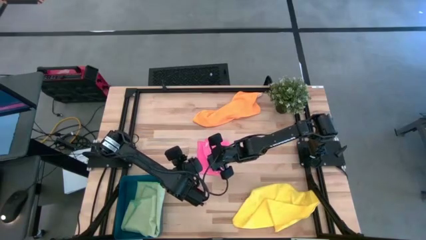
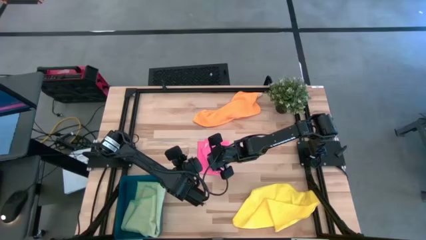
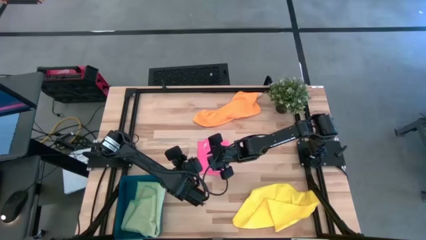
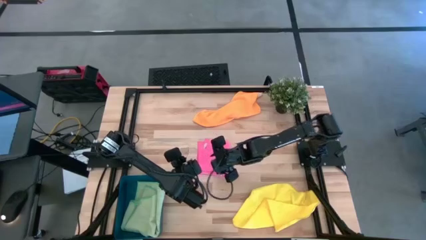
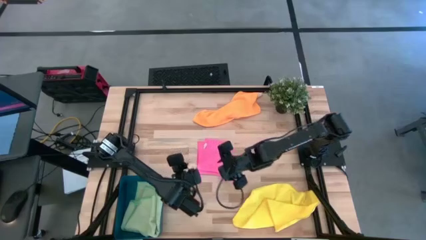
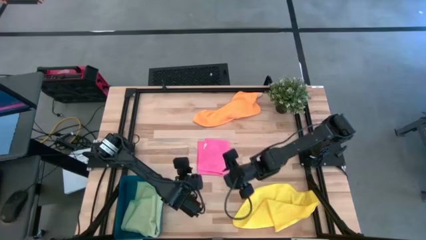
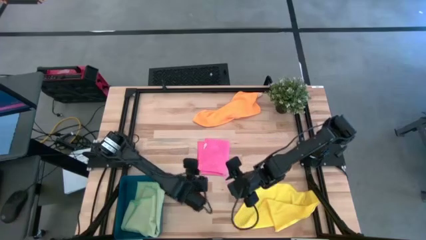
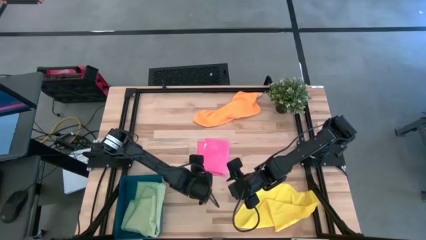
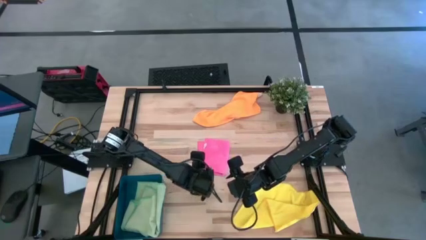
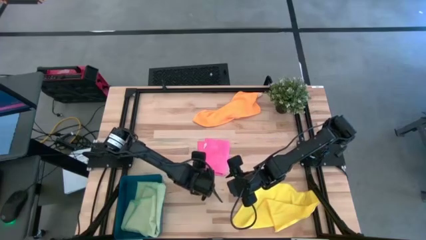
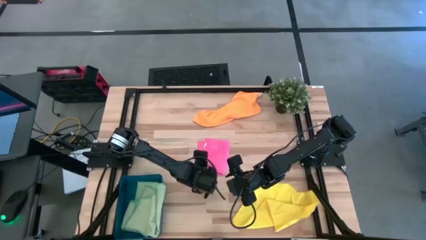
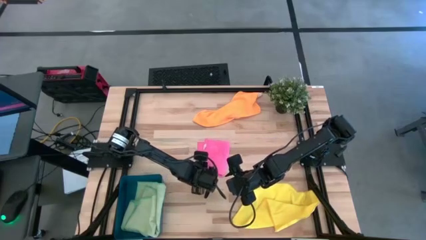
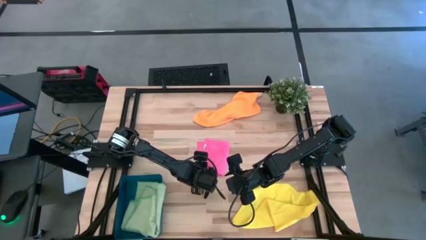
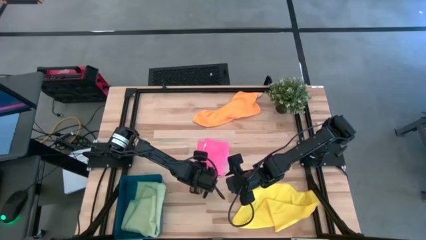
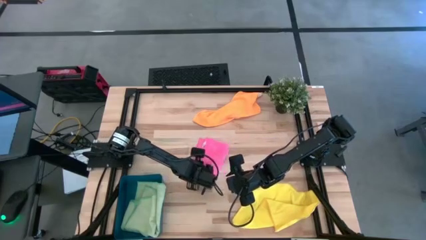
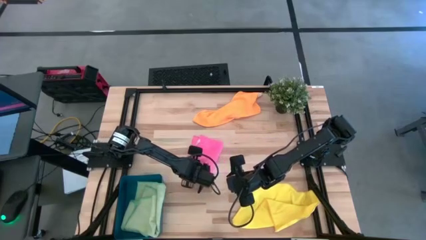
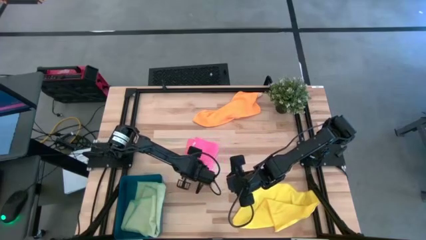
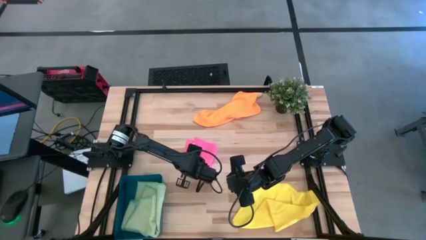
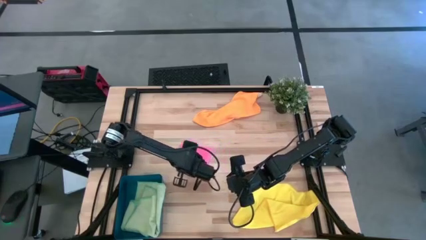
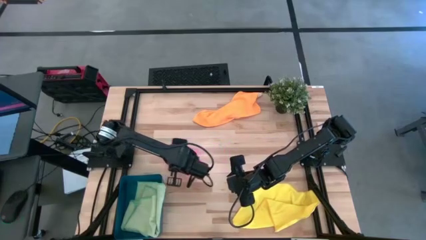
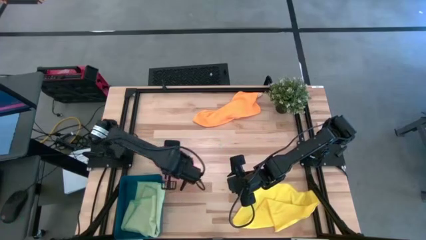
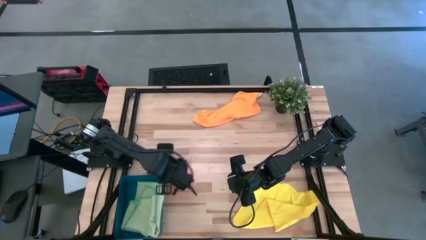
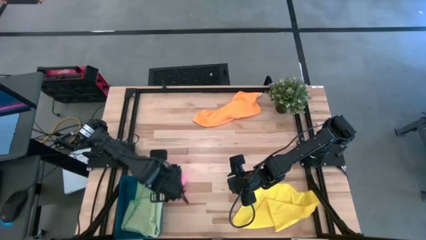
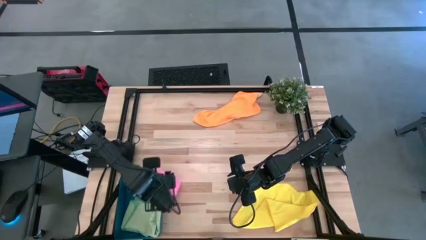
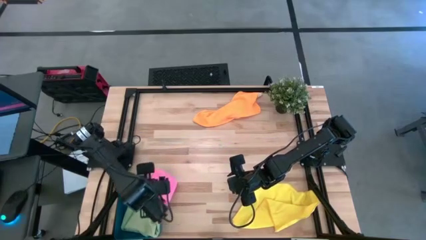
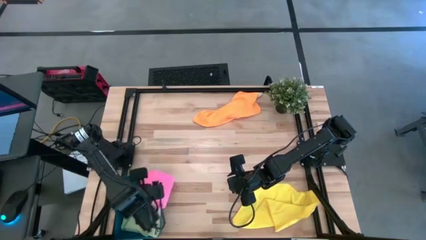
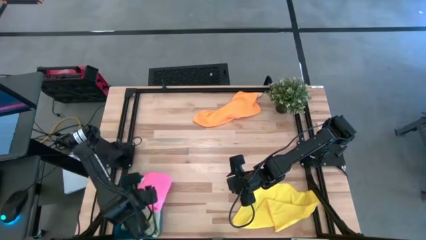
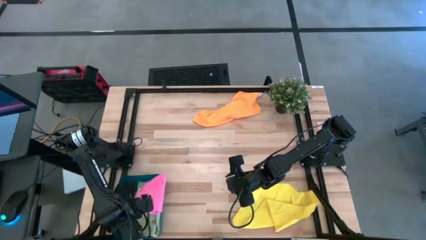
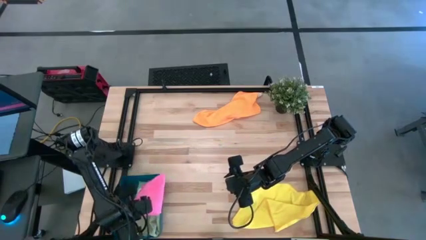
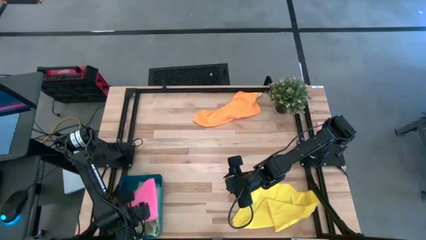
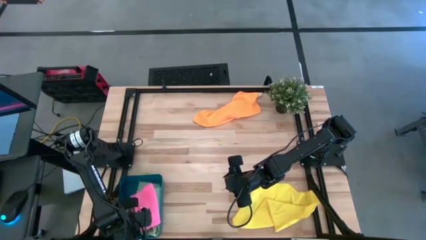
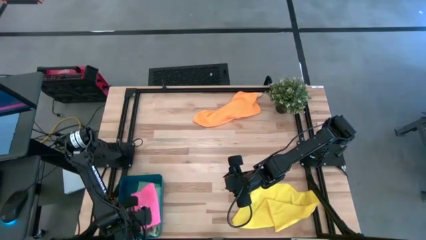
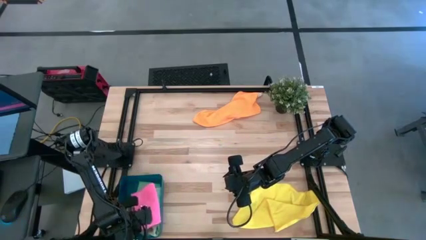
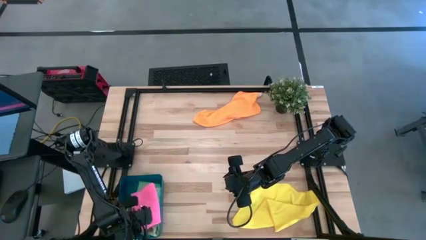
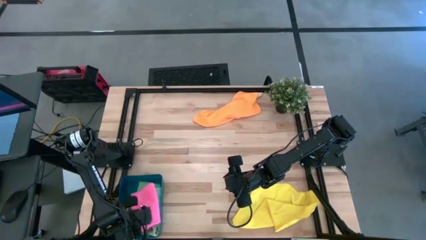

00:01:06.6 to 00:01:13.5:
Task: Fold microfiber towels
Put the pink microfiber towel into the bin

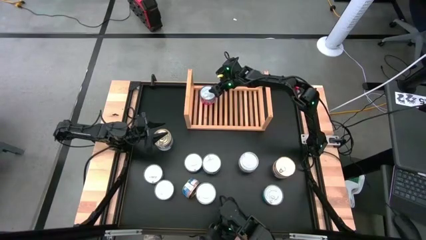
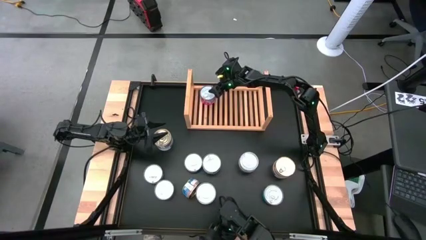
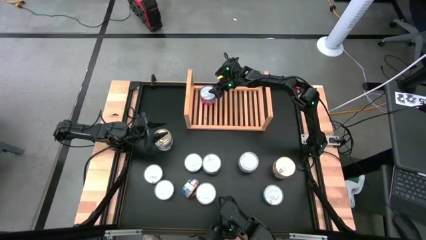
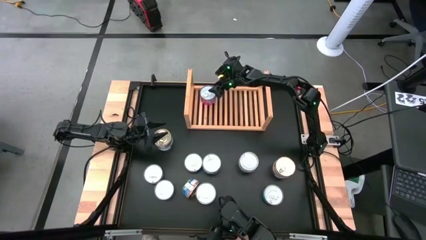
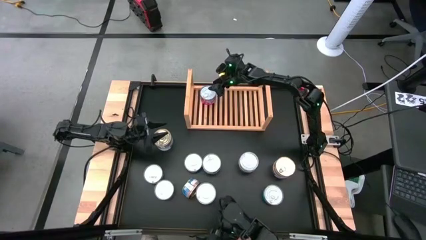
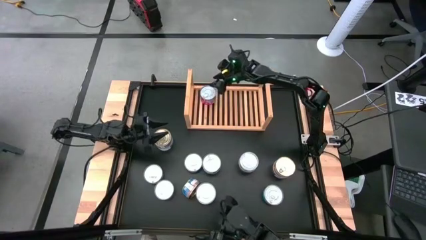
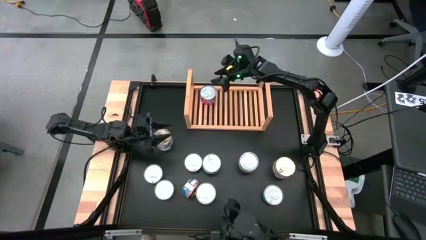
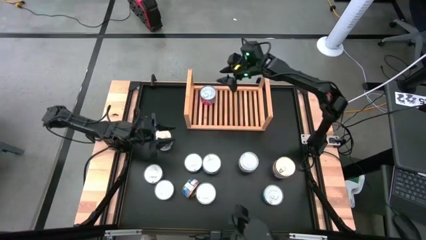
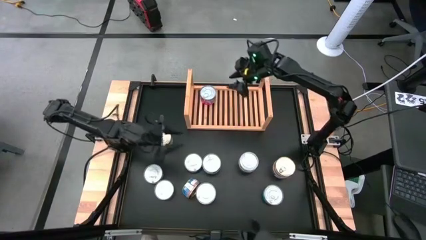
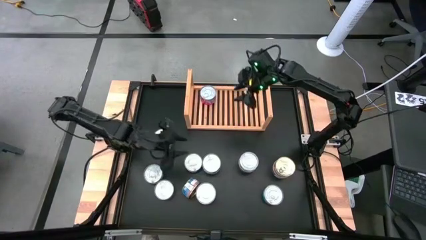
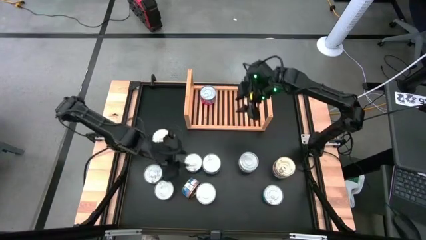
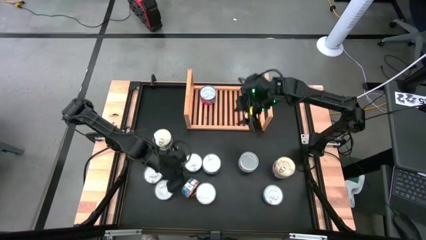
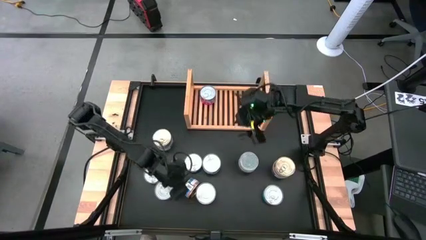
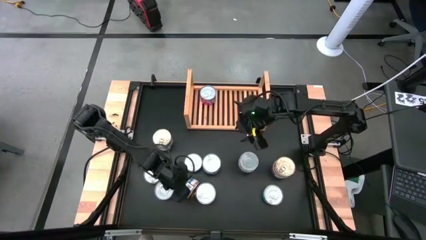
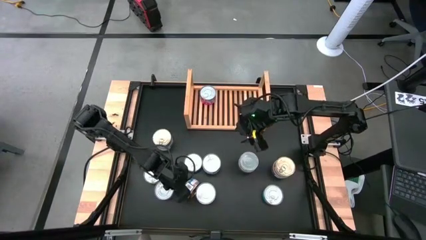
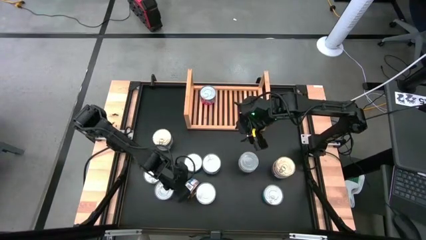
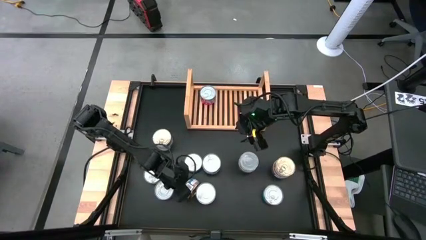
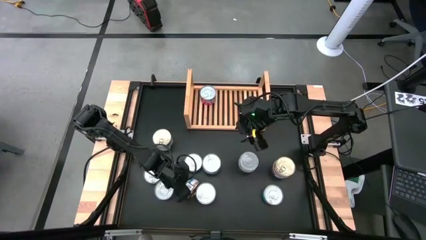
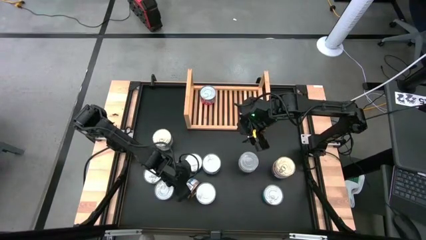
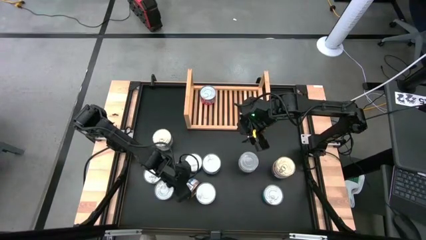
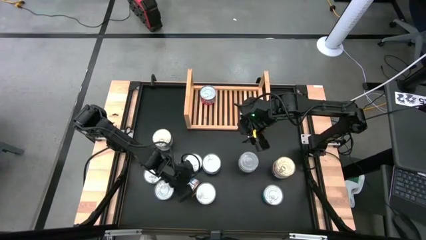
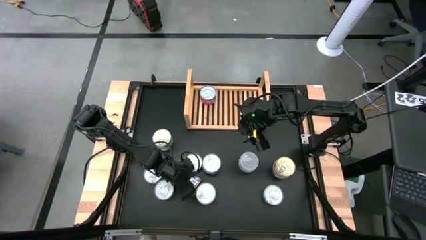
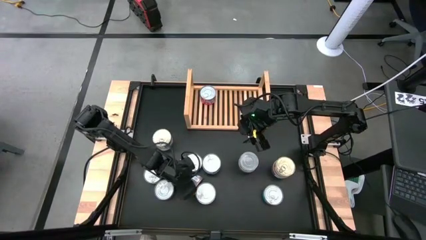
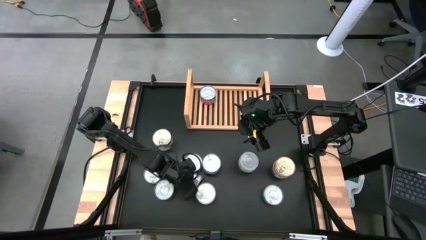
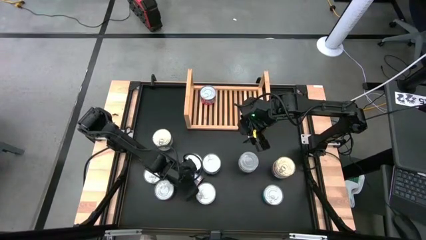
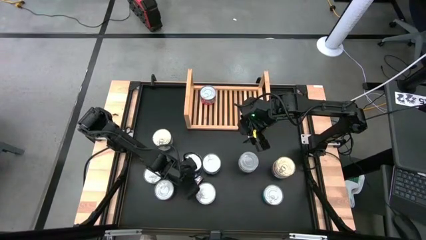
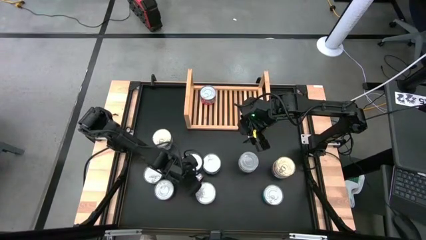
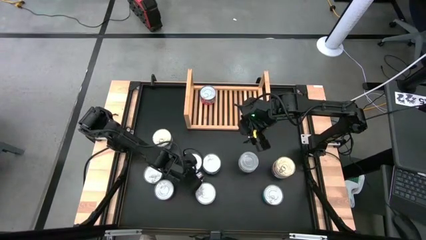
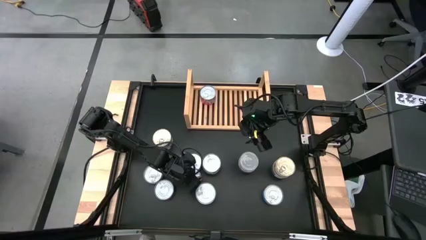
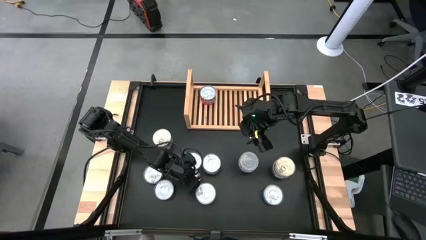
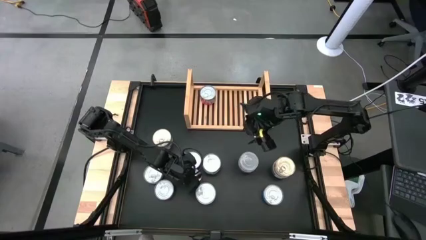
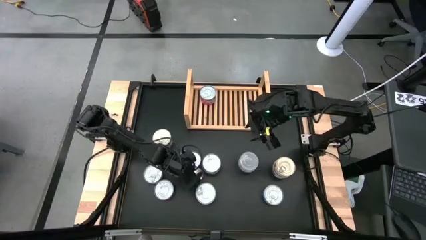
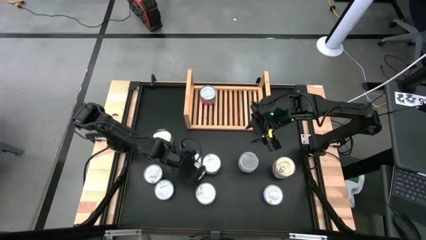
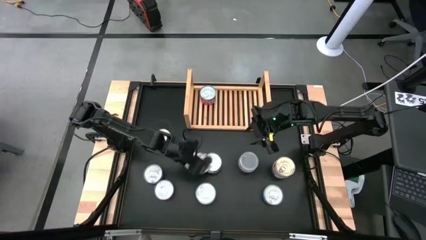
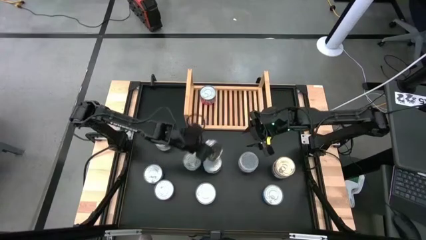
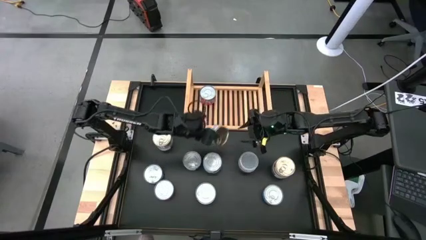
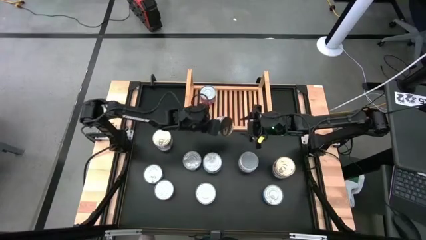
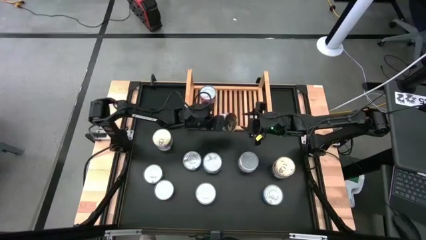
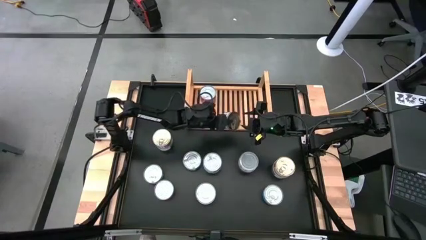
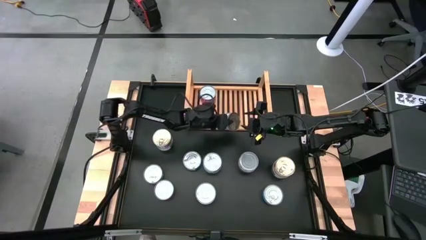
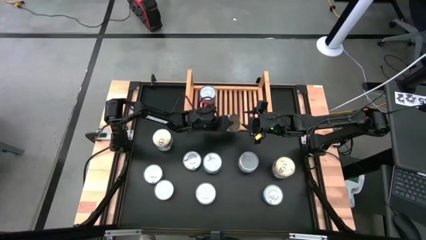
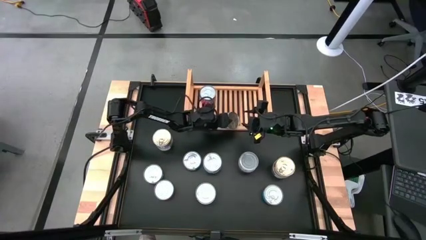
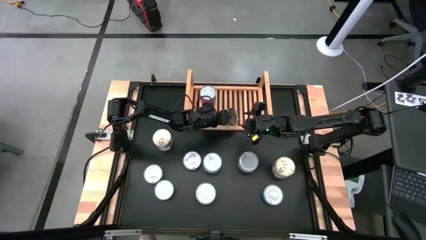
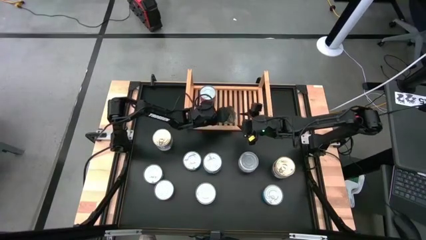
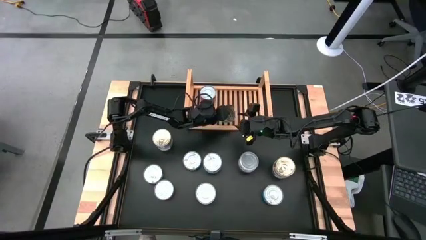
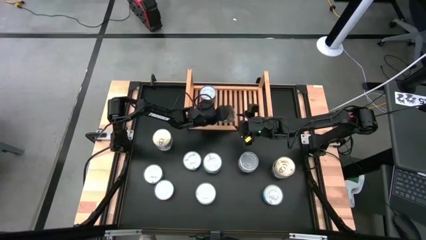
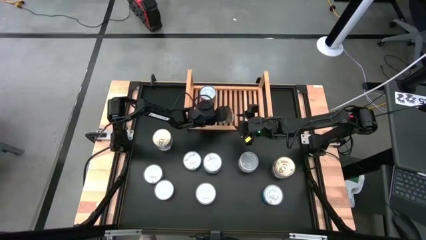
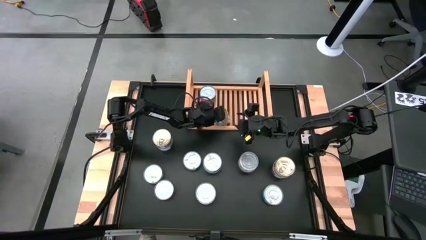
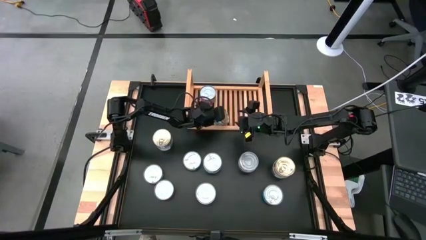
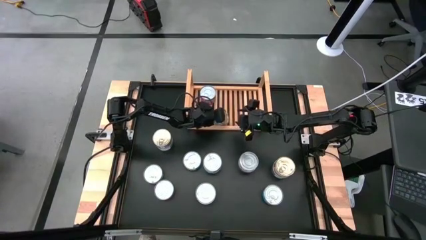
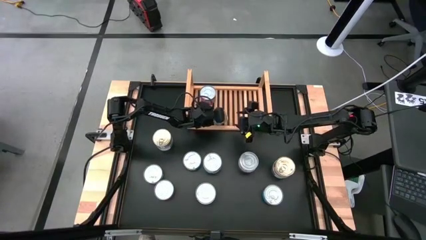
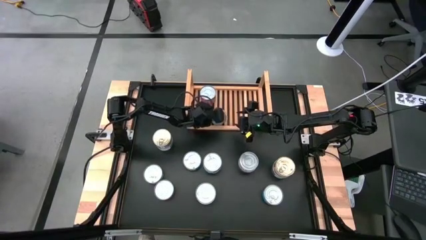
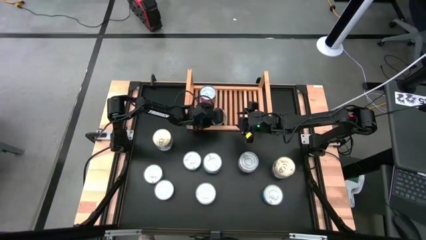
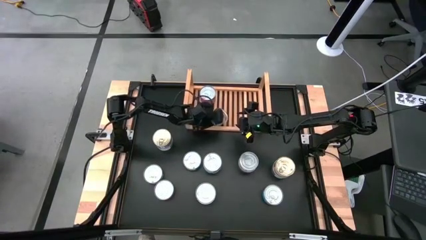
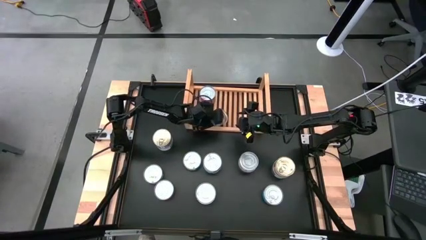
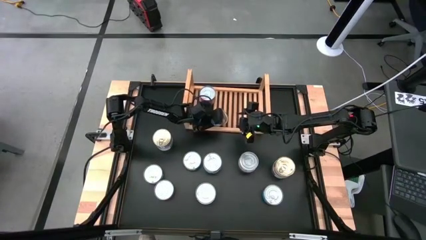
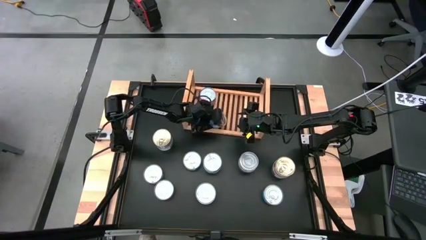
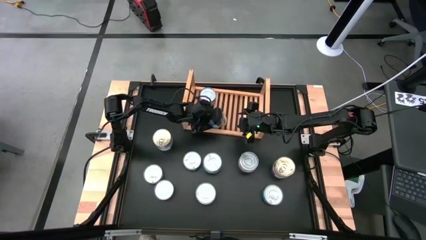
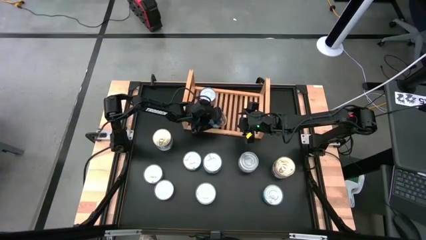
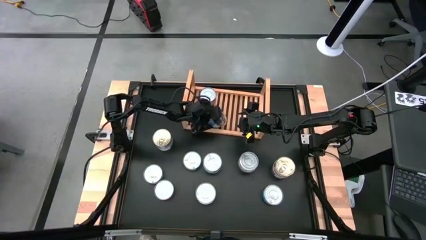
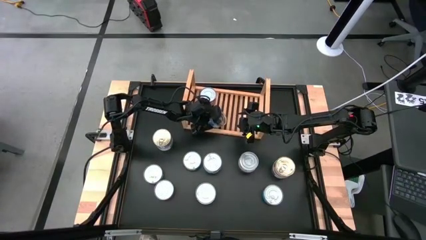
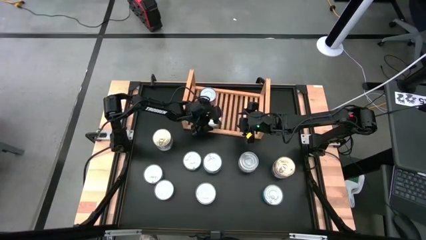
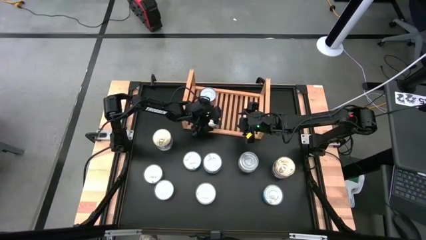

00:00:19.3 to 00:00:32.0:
Task: Stack canned seafood by type on shelf
Put the blue tuna can on the shelf
